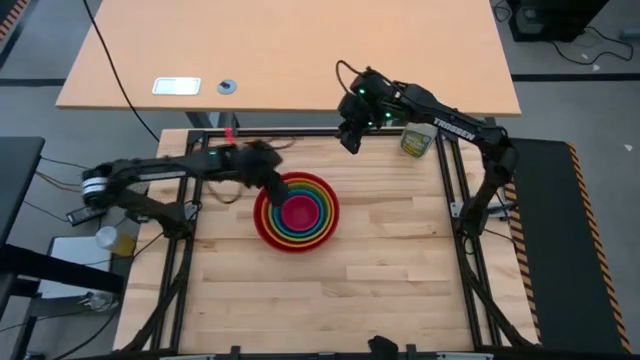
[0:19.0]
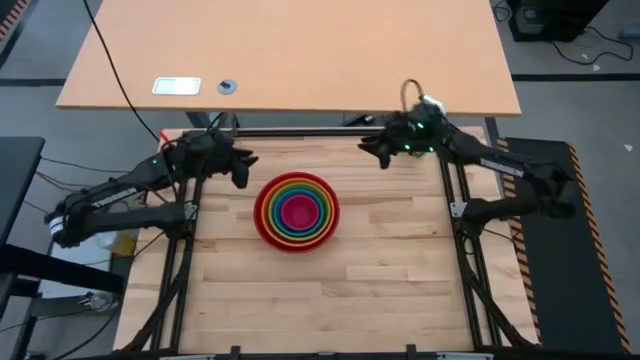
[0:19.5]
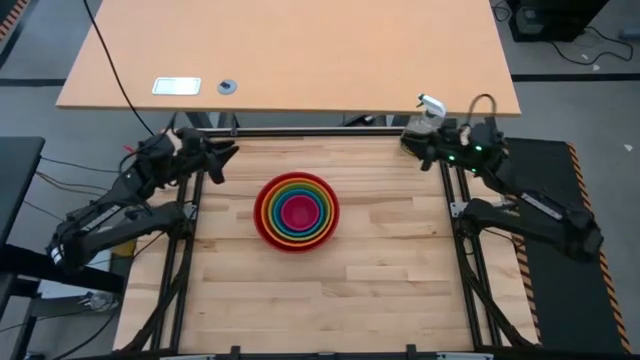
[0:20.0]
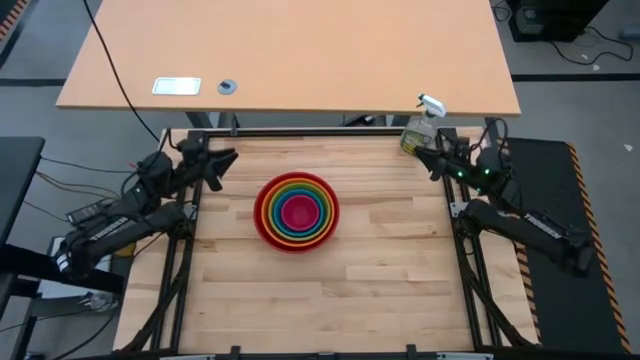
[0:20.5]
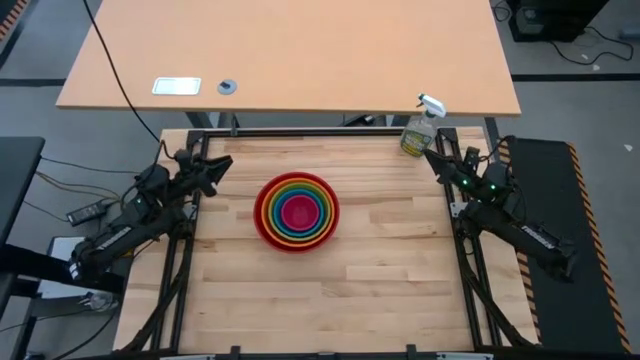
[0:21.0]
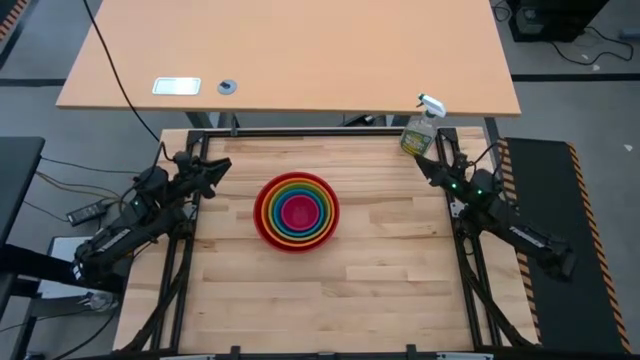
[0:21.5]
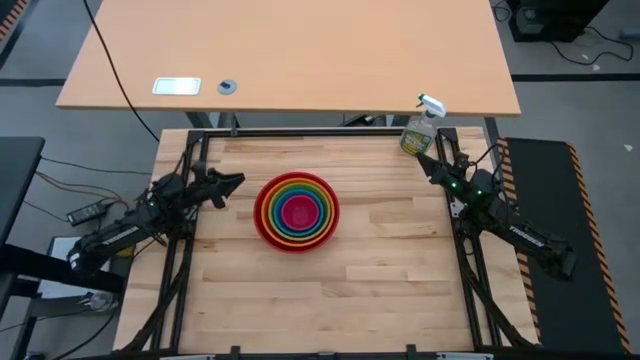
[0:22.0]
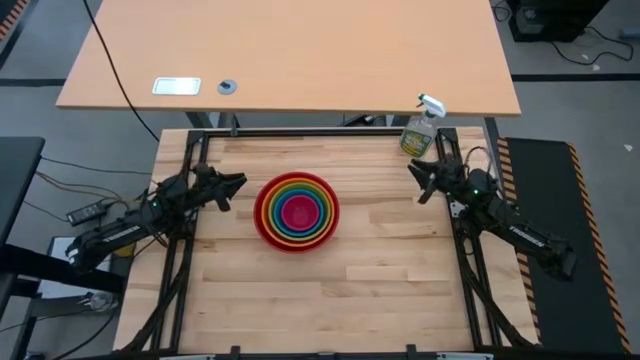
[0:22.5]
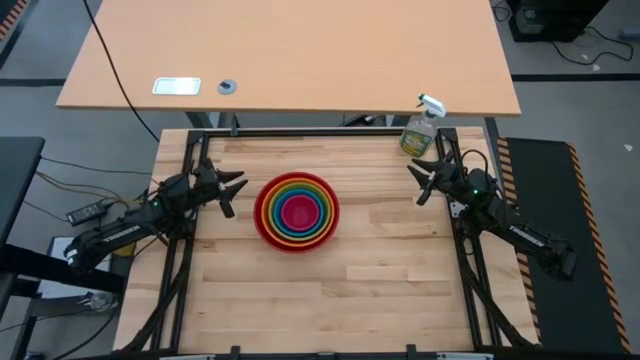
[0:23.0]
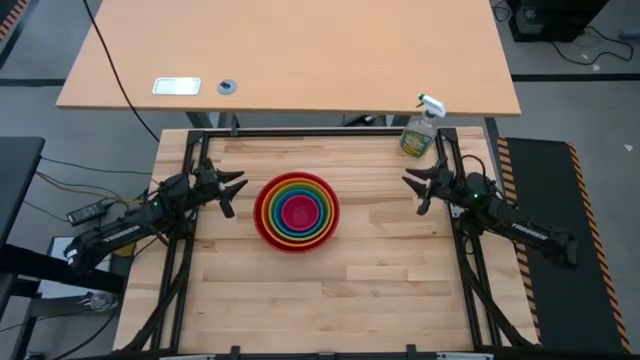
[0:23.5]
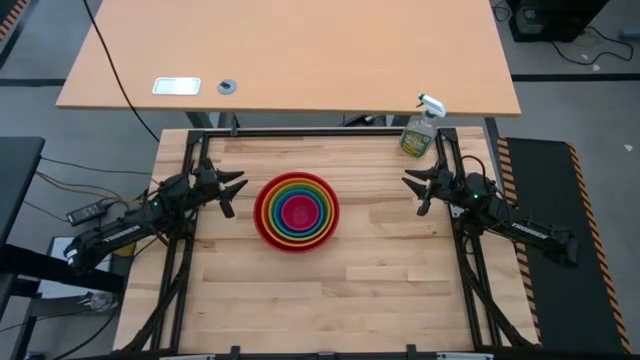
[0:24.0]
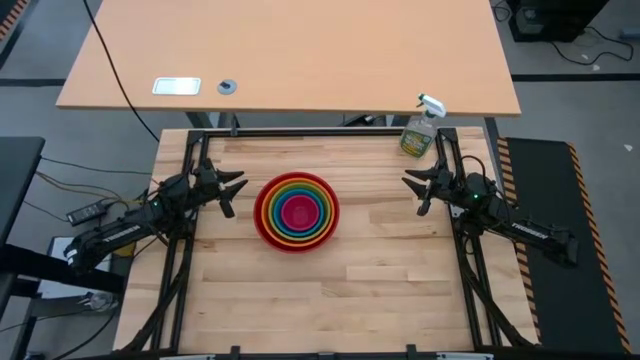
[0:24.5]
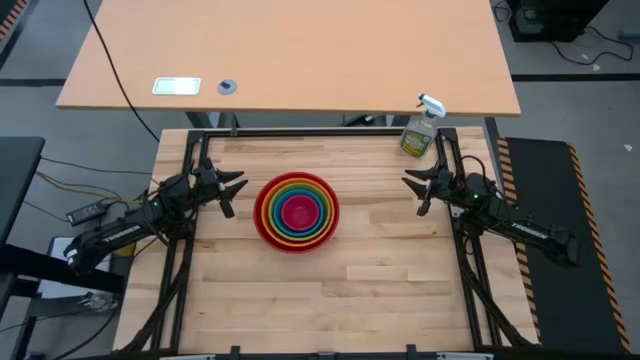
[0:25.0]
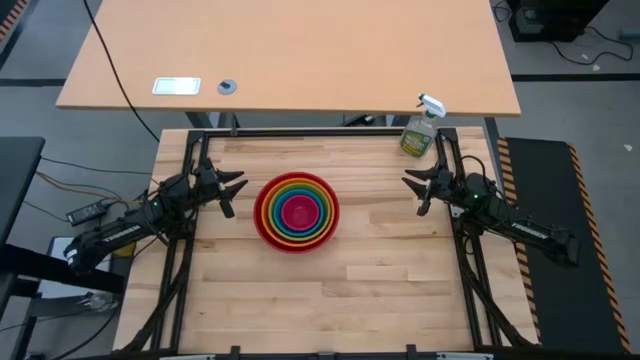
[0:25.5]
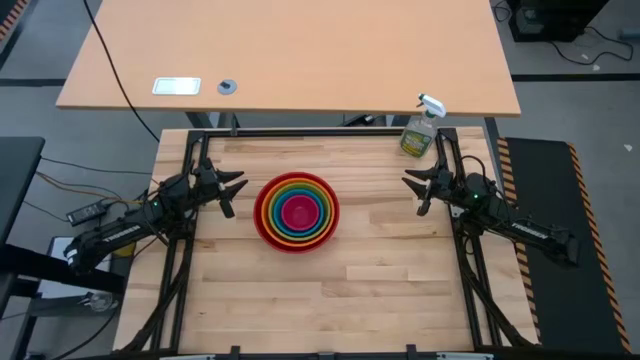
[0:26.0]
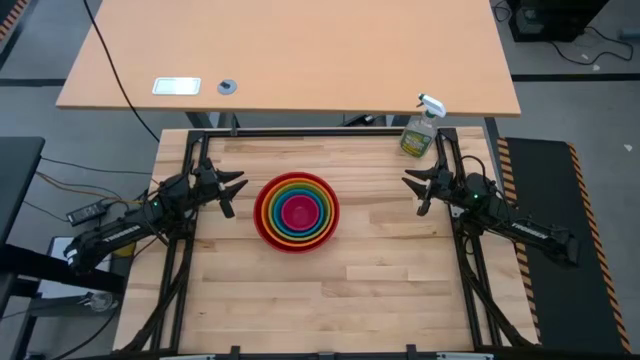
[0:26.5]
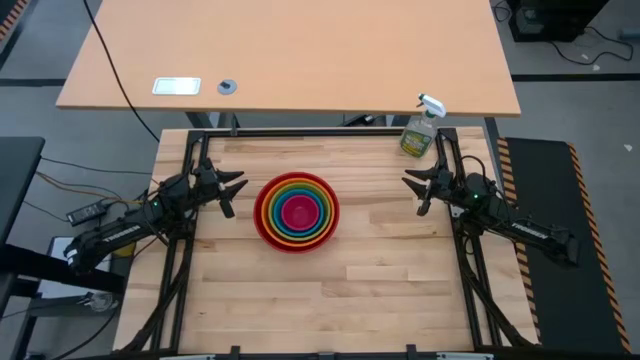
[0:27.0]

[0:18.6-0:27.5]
Return to Home Position

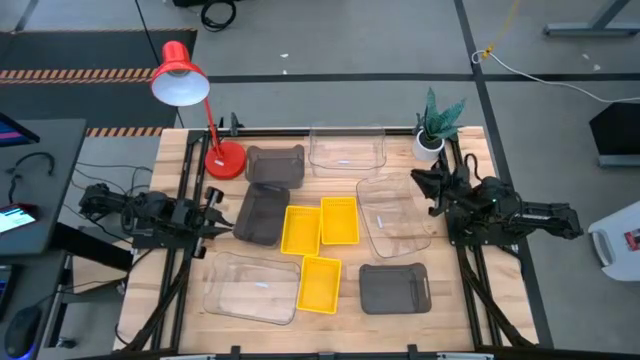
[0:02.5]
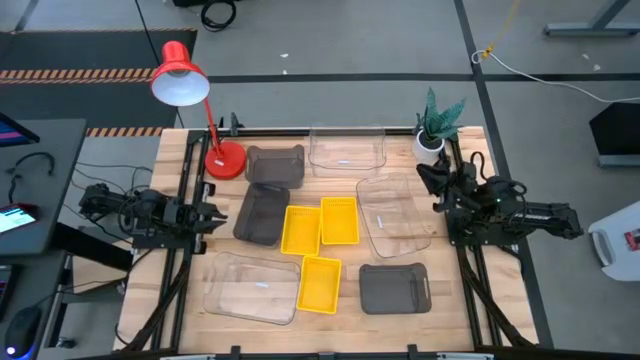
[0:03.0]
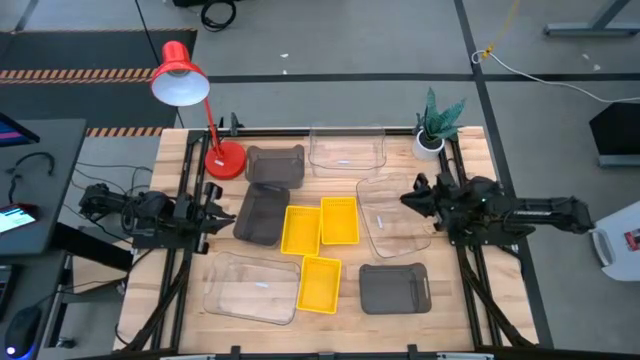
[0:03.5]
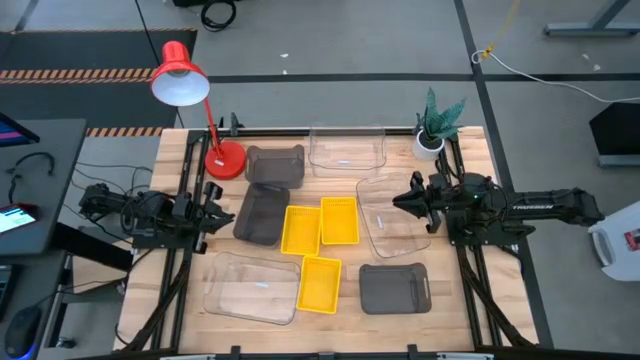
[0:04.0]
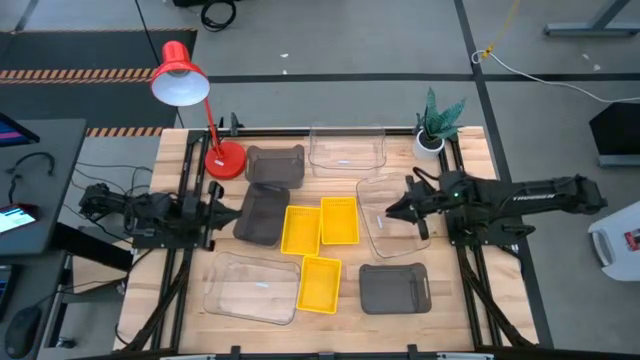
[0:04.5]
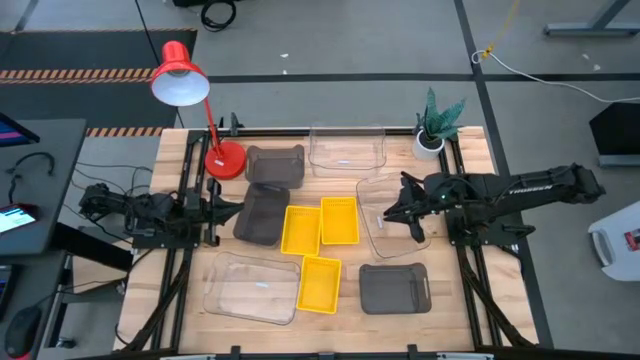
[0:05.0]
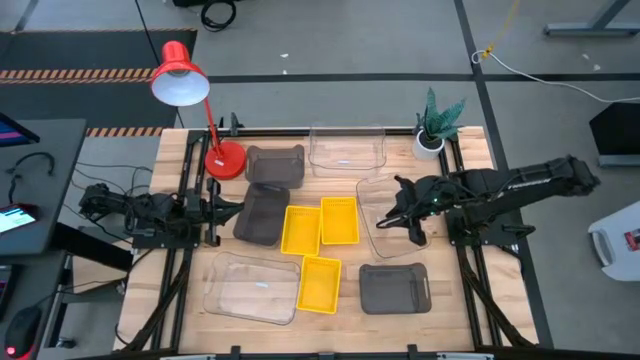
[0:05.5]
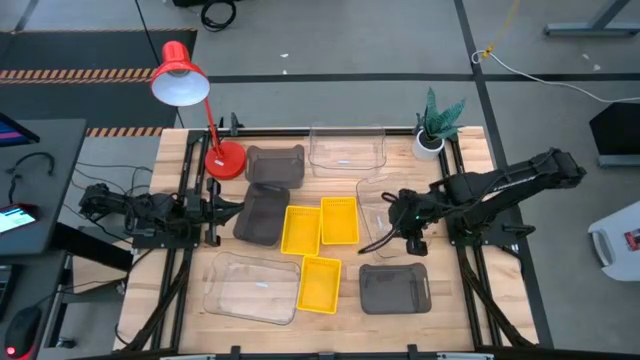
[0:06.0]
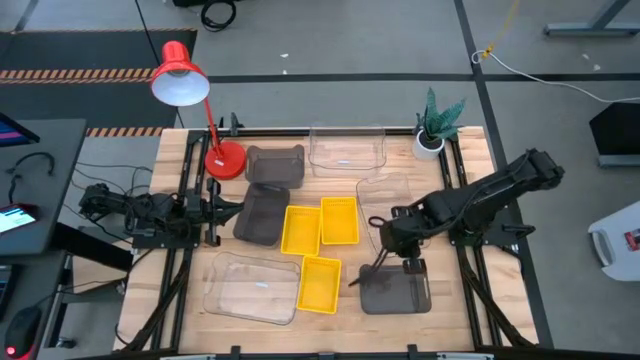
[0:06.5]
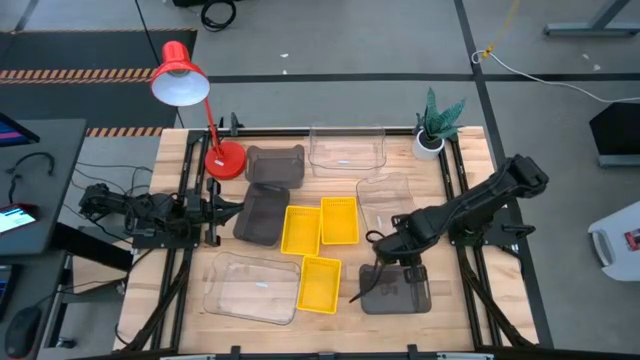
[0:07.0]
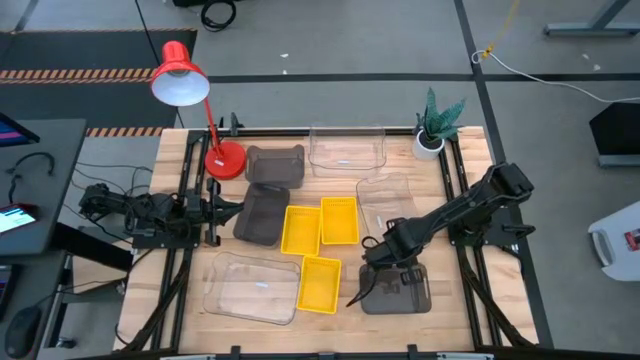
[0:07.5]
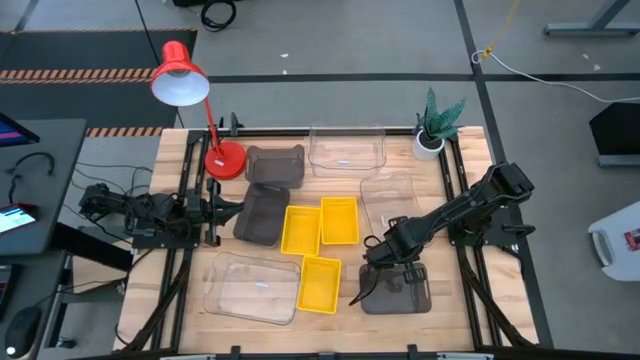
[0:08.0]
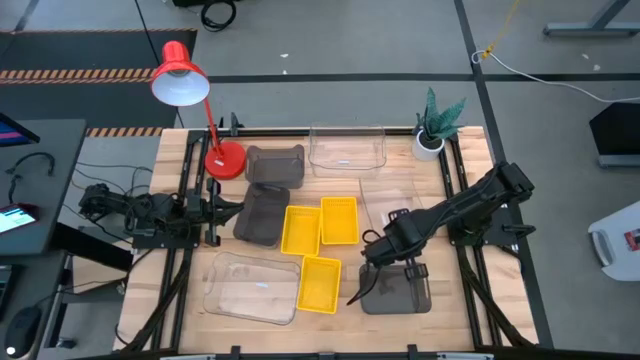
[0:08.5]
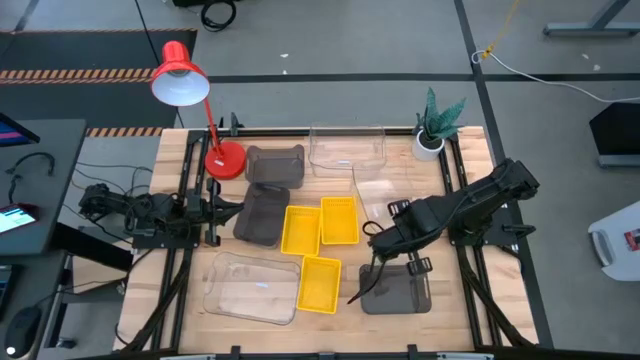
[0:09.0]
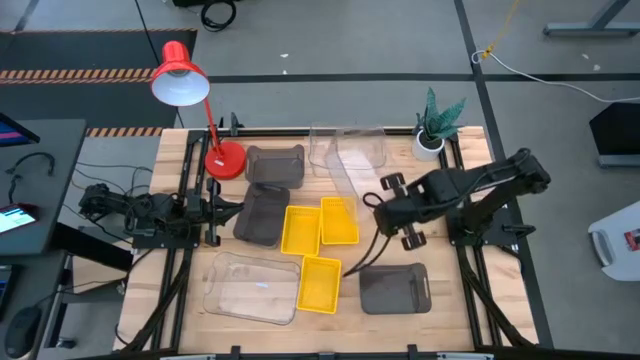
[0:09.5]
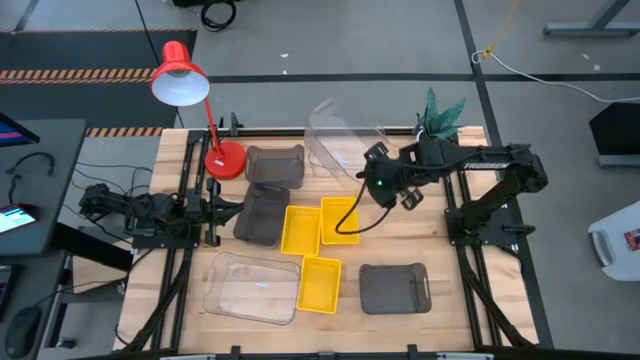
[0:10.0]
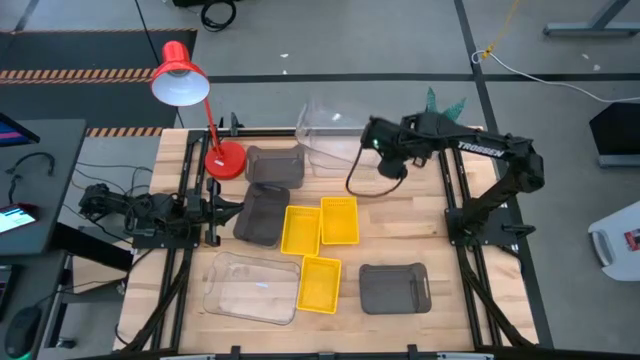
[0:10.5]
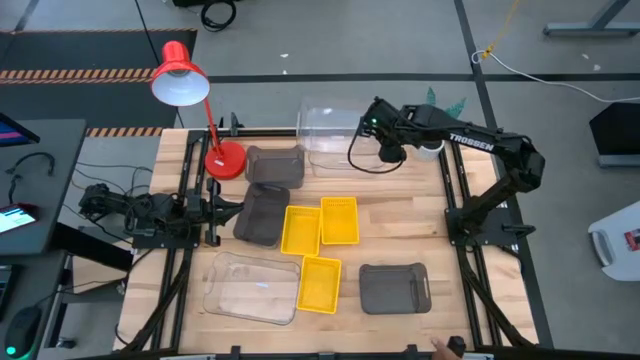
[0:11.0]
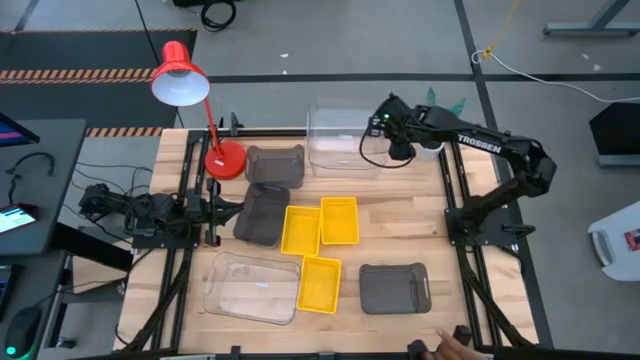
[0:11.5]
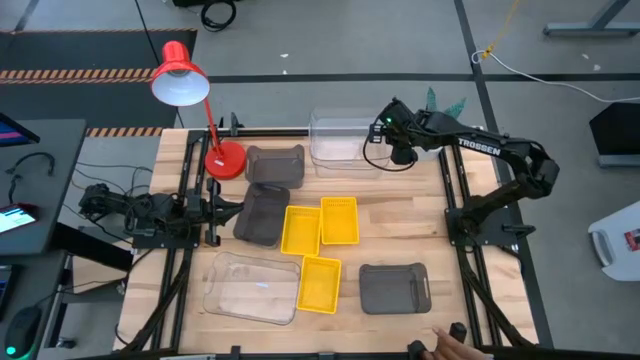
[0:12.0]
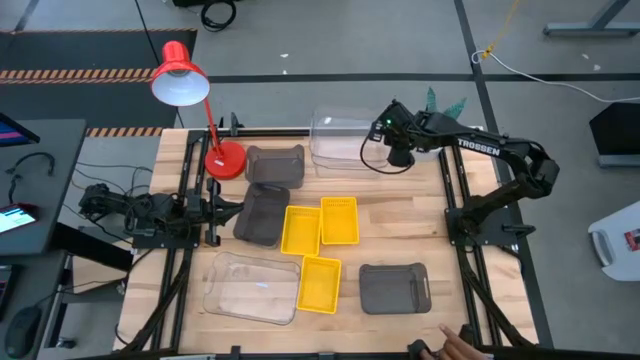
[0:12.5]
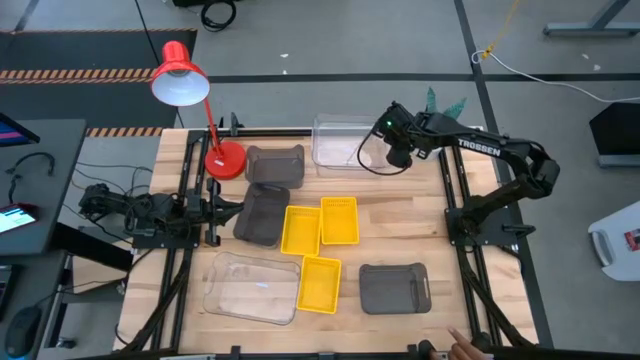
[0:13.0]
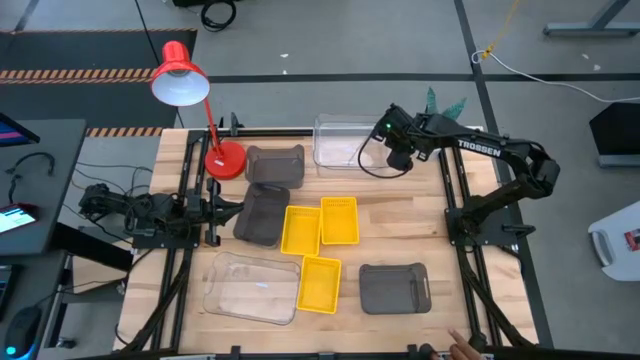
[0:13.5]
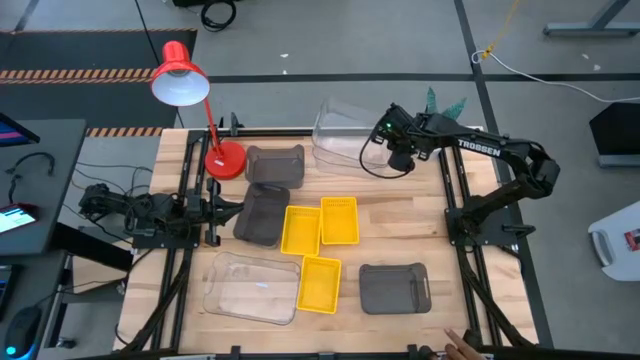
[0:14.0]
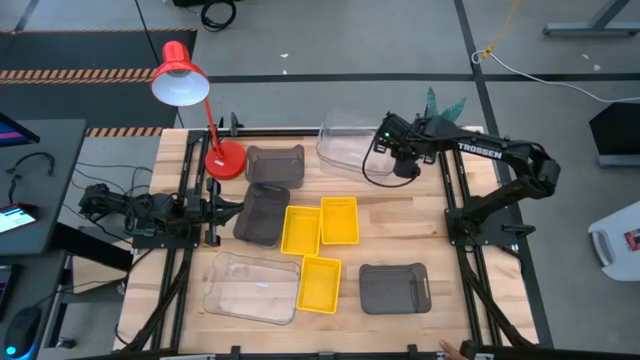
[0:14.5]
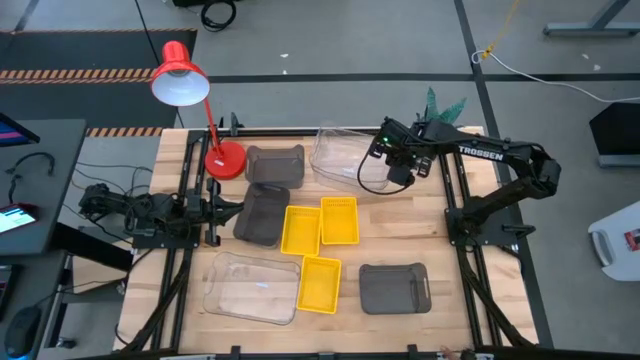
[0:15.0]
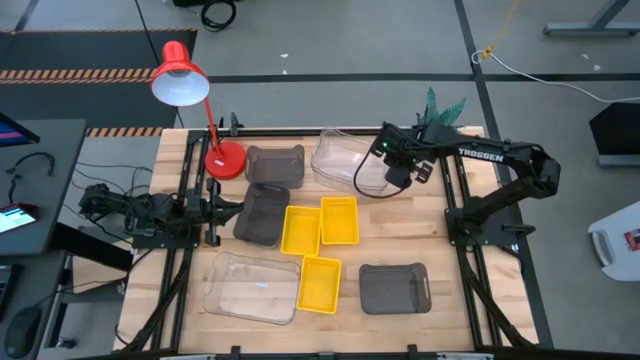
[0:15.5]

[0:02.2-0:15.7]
Stack the right transparent bin on the top of the top transparent bin
